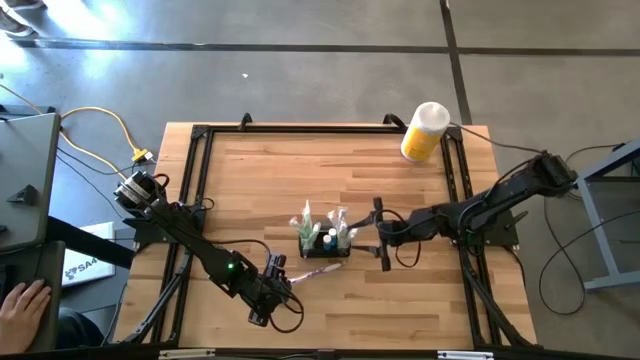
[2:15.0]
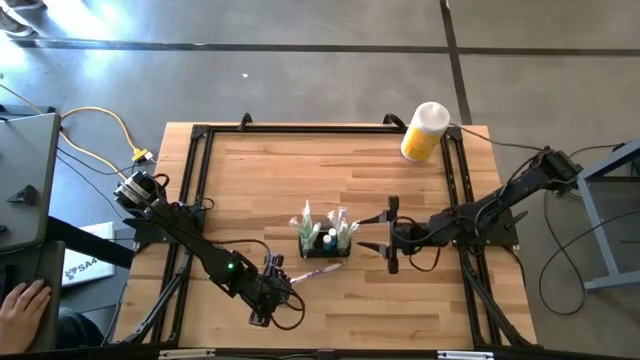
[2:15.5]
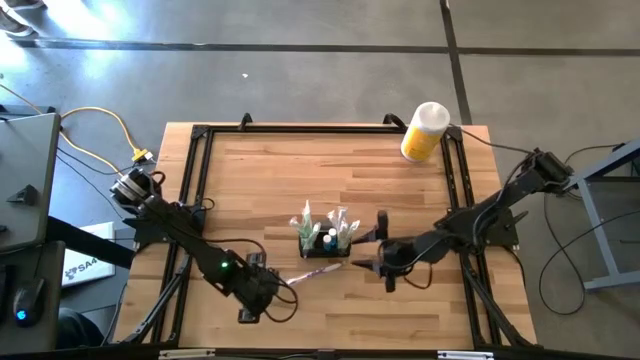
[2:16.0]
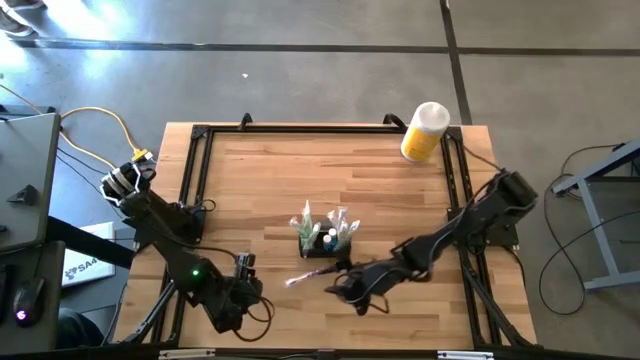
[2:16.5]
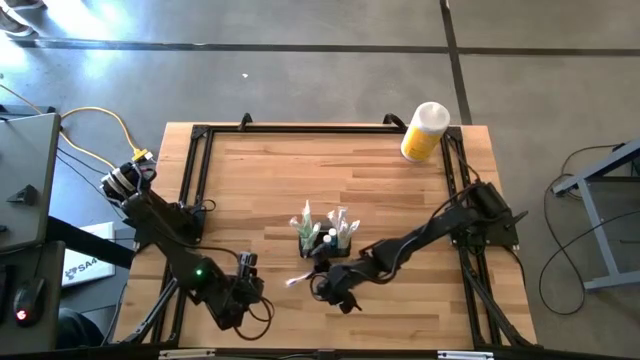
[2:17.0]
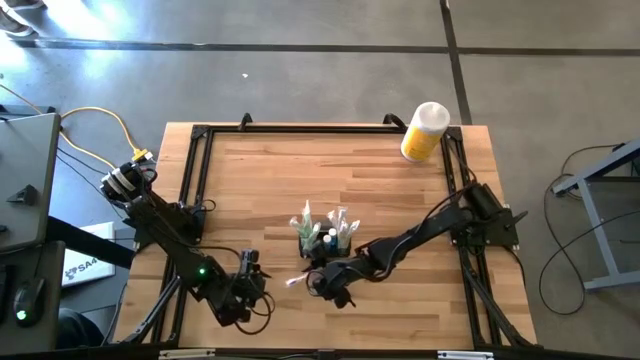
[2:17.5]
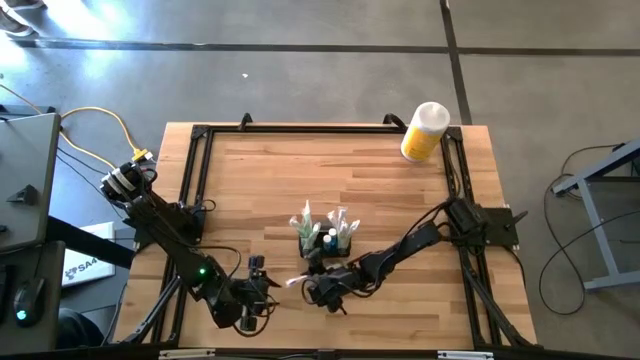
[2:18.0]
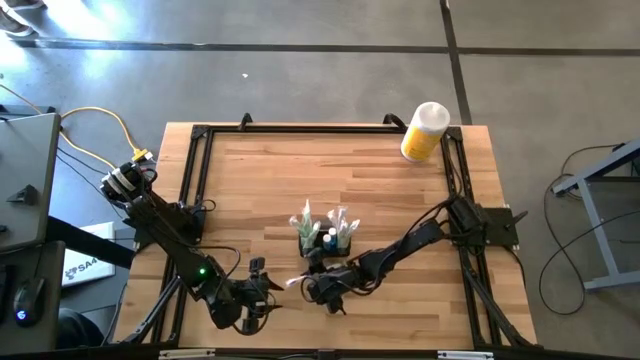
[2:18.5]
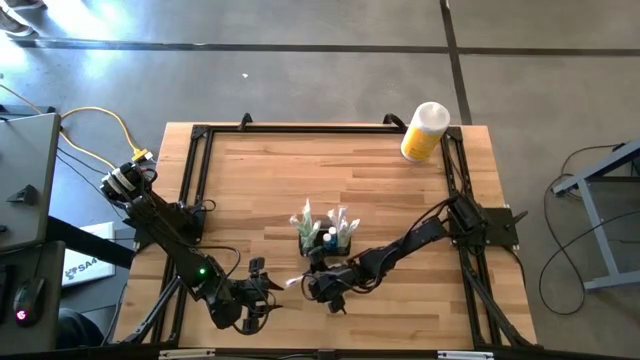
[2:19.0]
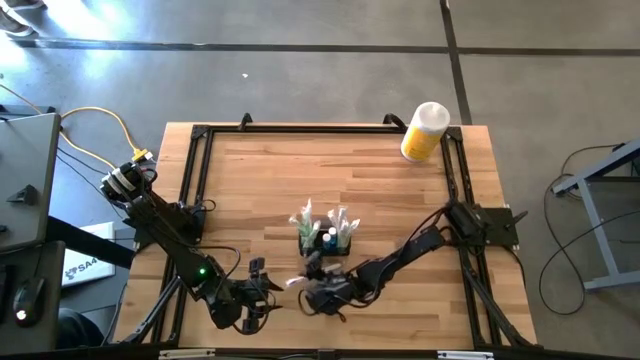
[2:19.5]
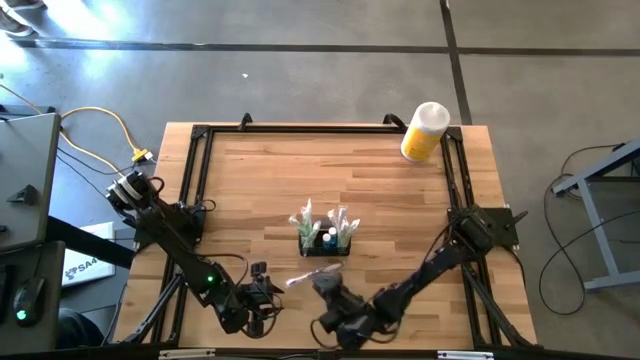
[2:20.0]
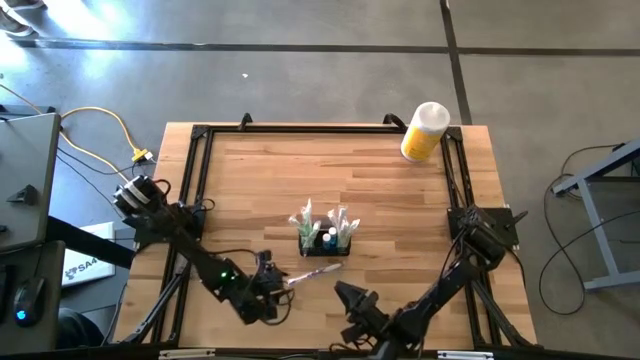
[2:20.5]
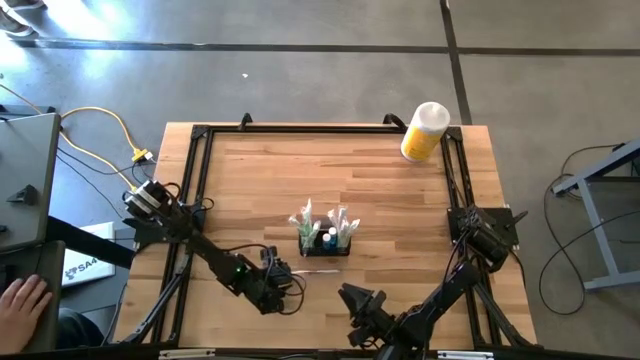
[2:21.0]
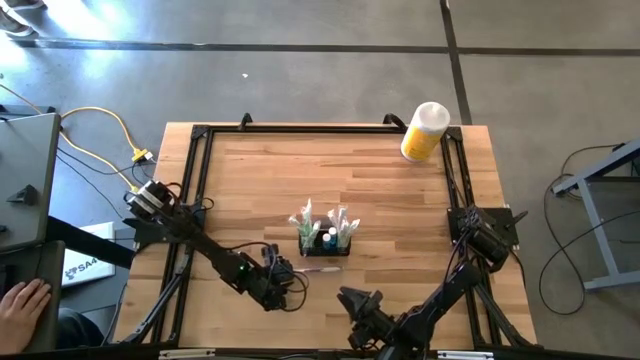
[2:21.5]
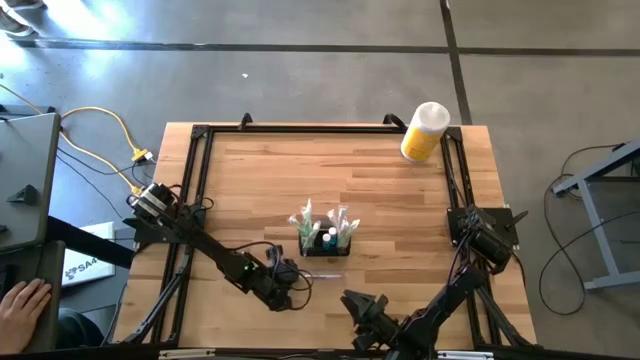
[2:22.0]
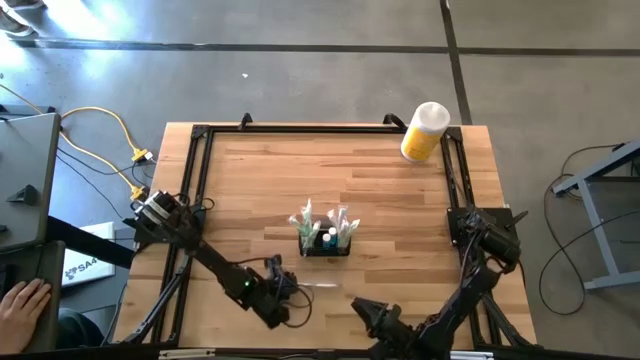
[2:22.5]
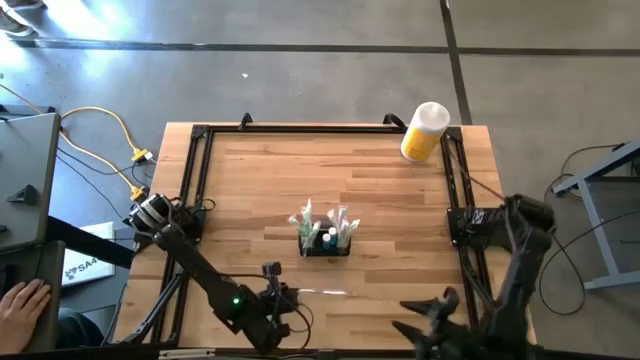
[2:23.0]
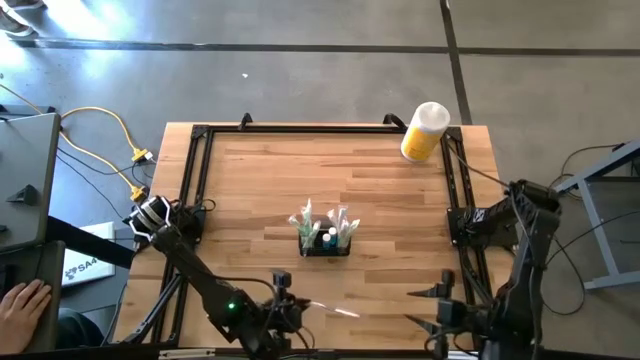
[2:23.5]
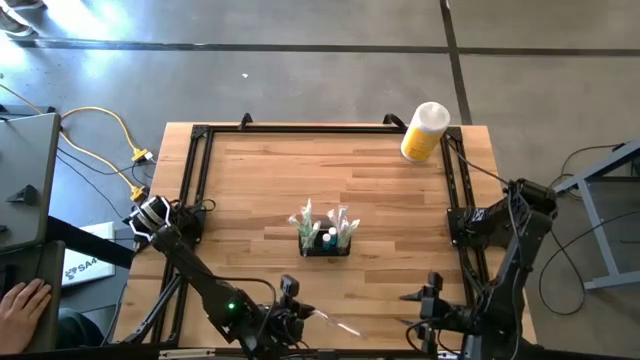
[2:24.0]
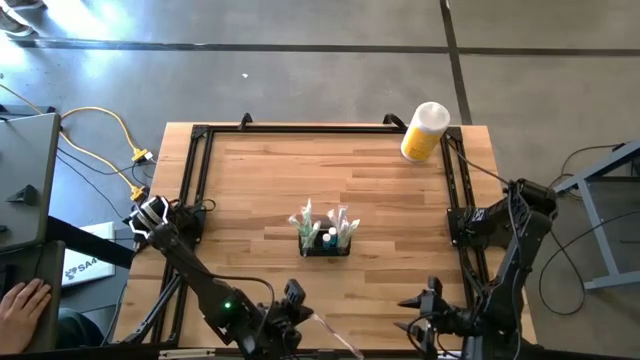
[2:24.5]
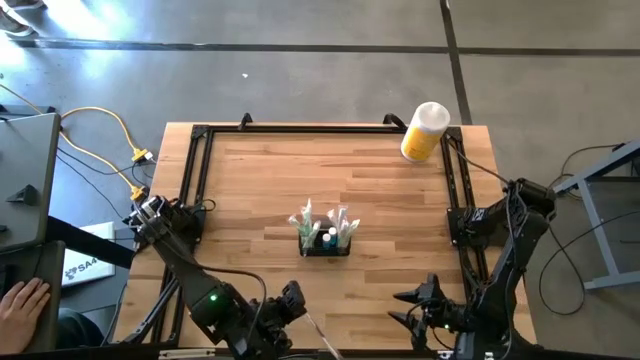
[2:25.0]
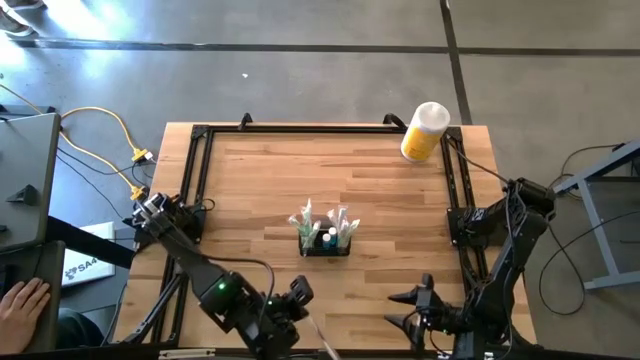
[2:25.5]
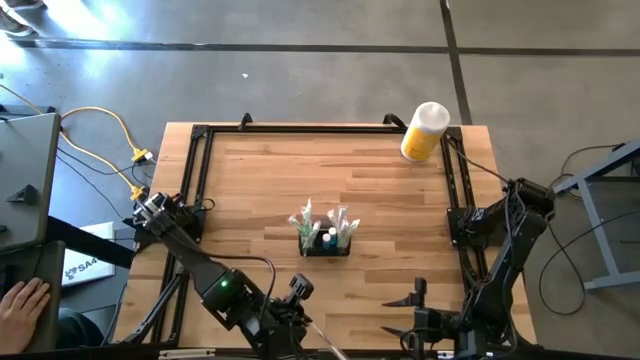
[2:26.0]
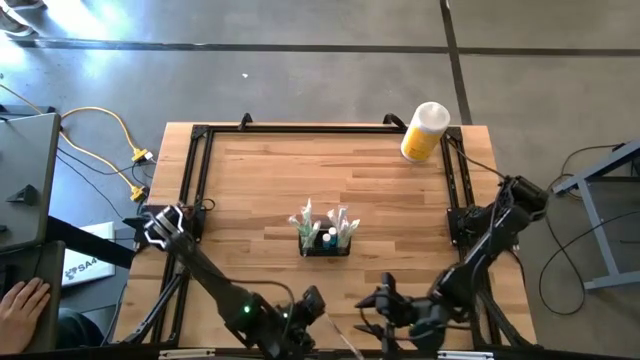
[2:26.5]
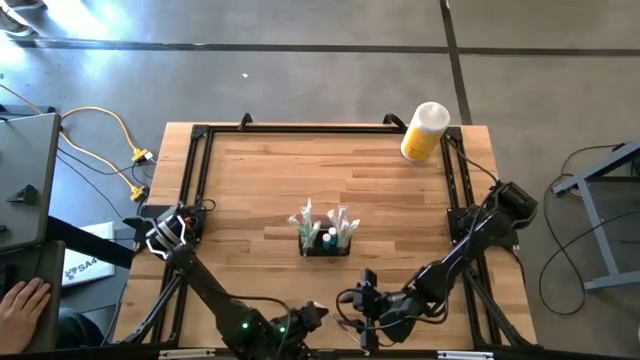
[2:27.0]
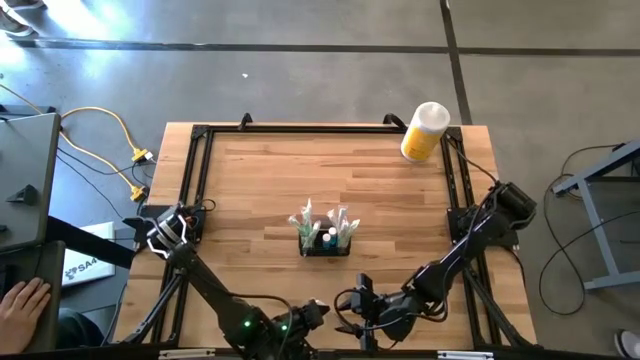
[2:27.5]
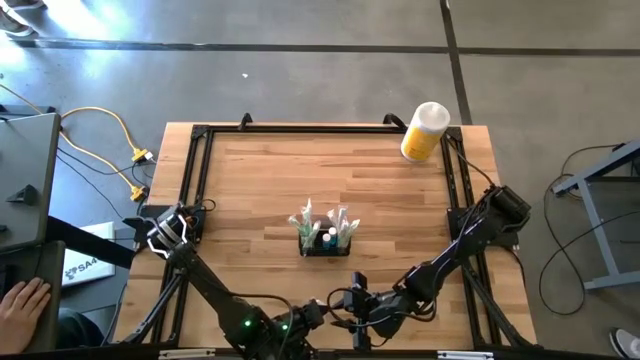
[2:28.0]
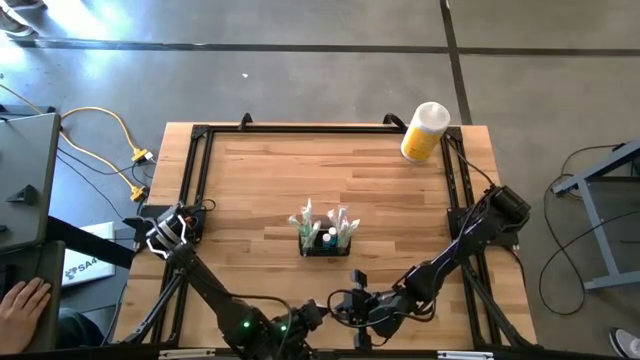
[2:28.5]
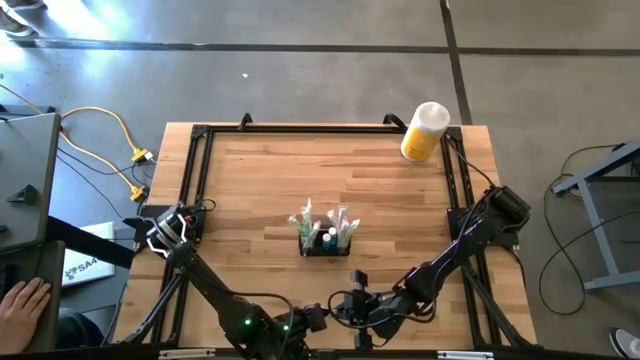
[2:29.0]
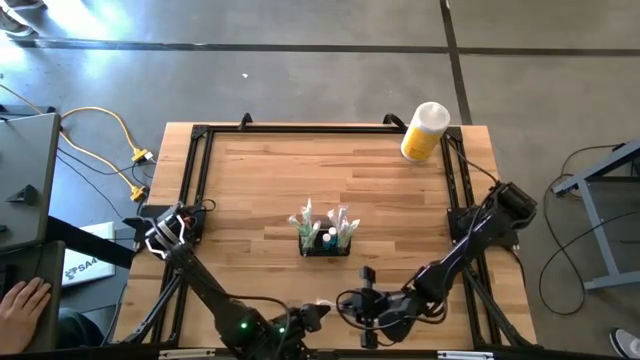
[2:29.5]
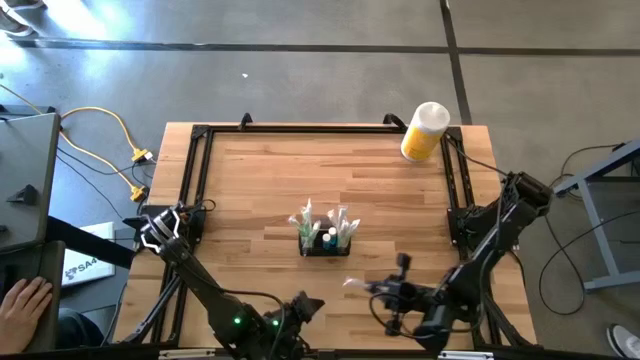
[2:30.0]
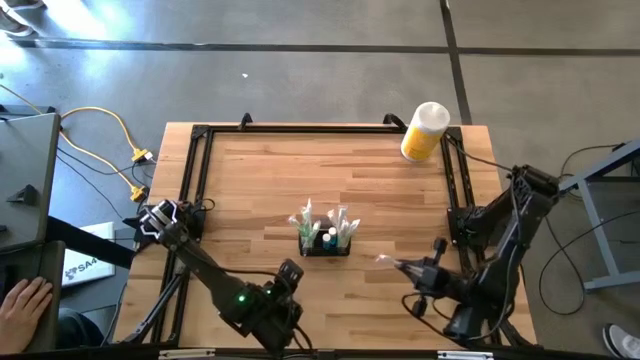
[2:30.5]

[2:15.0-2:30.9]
Task: Pick & Place toothbrushing station
Put the violet toothbrush into the black wire organizer
